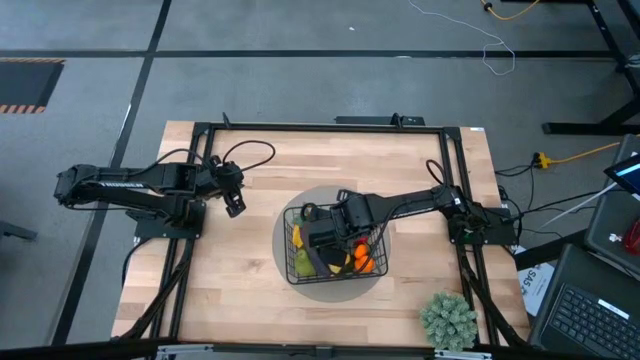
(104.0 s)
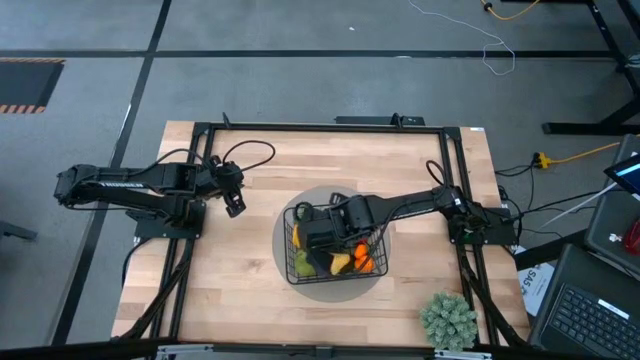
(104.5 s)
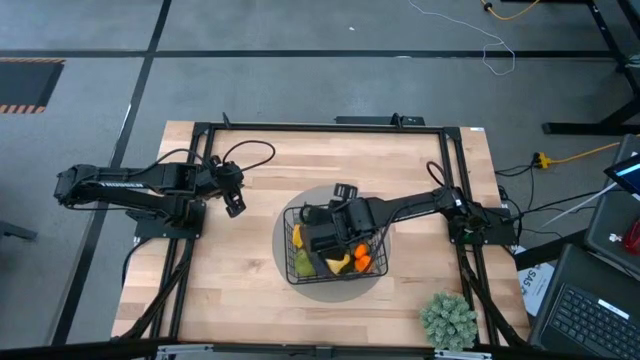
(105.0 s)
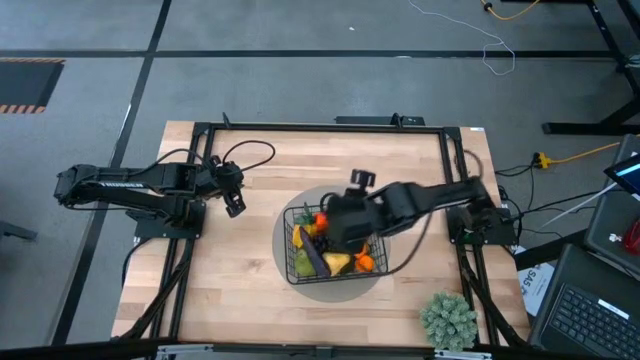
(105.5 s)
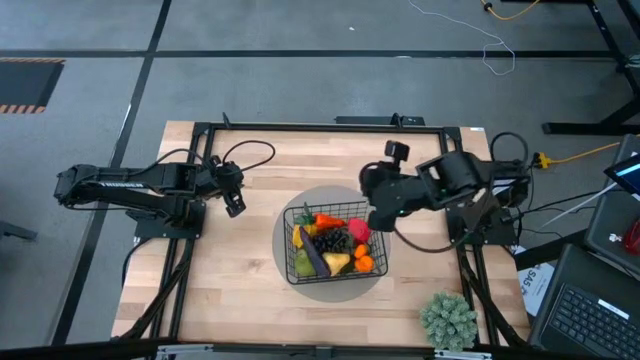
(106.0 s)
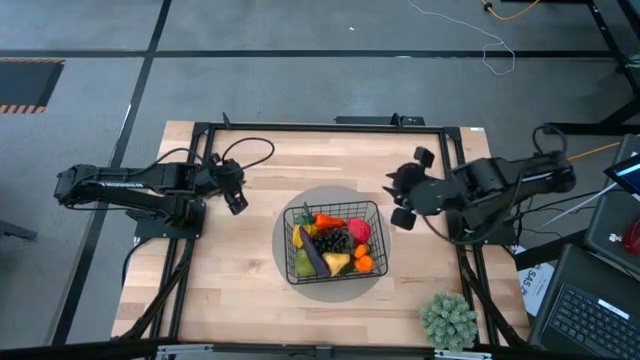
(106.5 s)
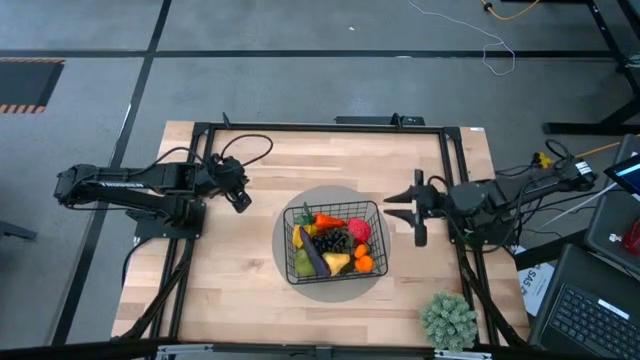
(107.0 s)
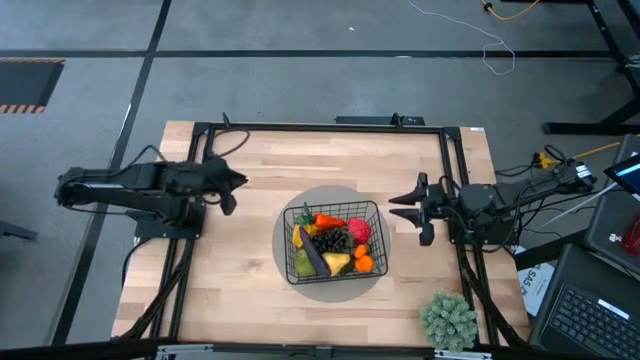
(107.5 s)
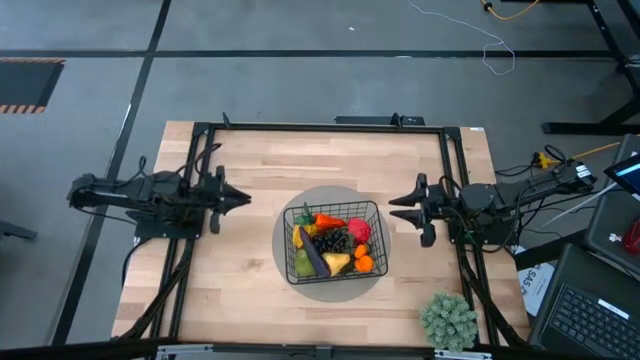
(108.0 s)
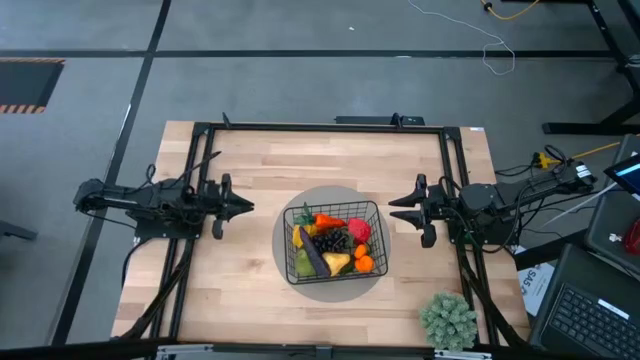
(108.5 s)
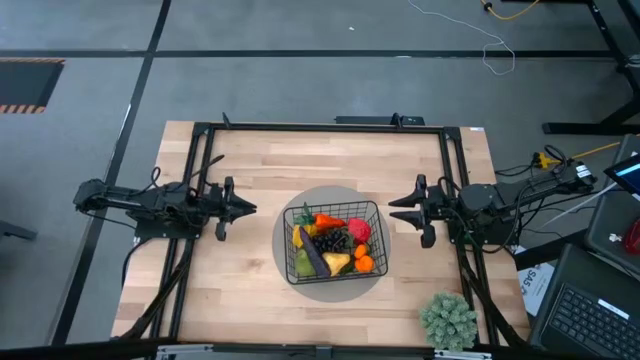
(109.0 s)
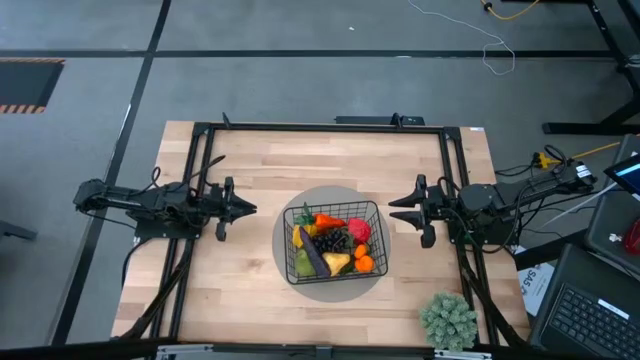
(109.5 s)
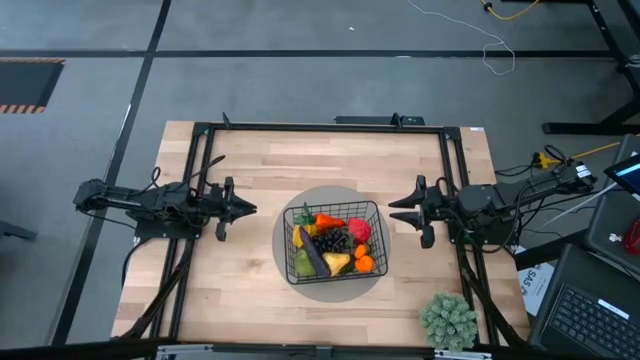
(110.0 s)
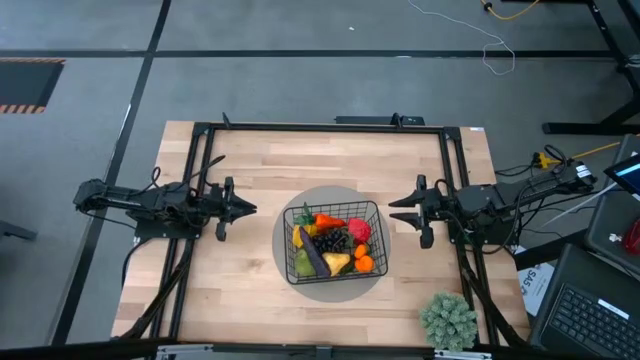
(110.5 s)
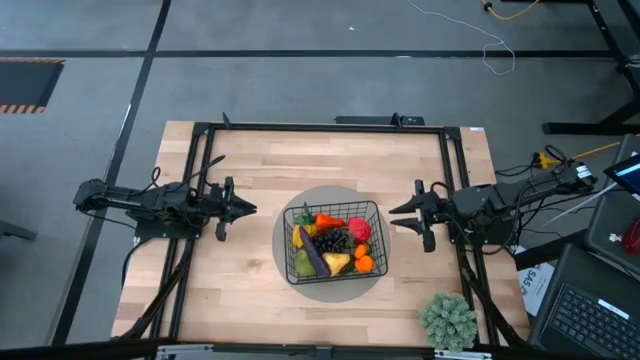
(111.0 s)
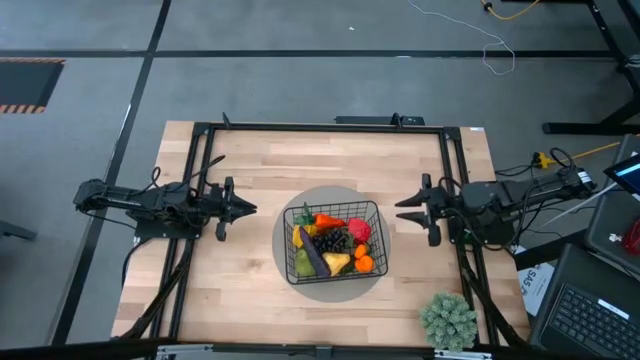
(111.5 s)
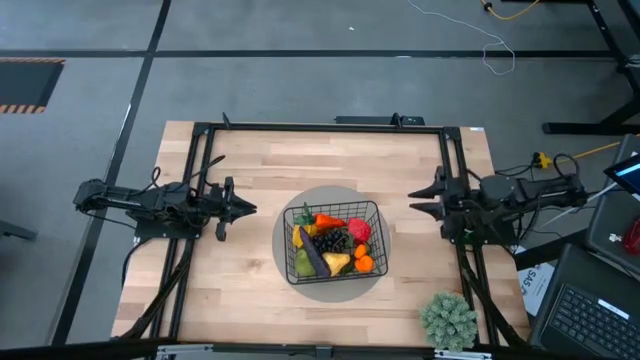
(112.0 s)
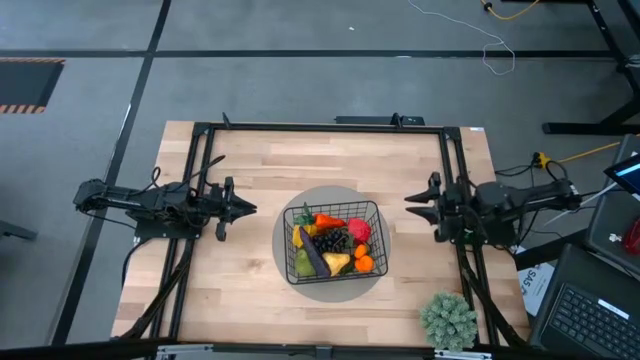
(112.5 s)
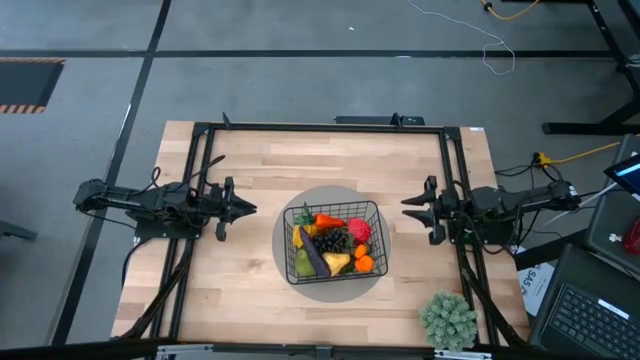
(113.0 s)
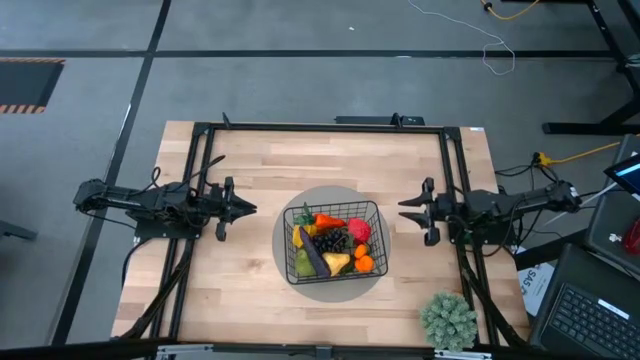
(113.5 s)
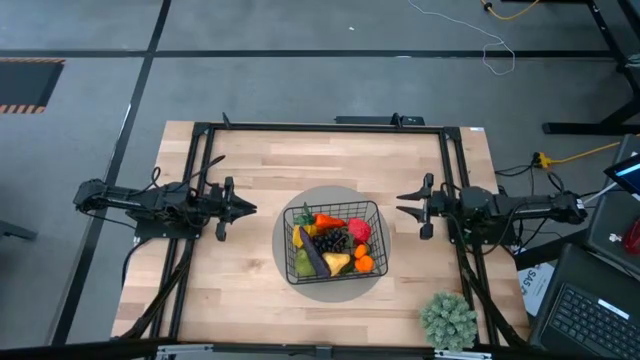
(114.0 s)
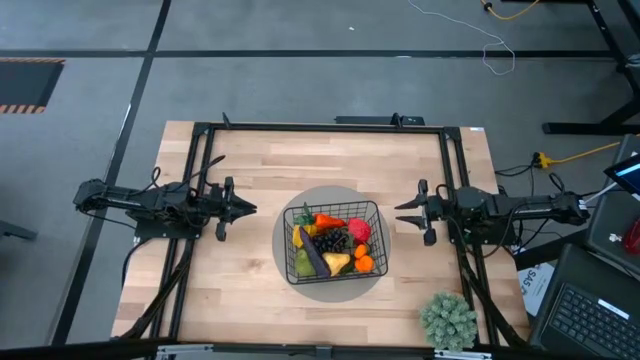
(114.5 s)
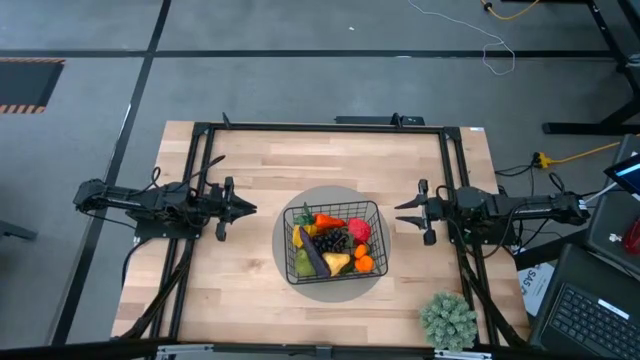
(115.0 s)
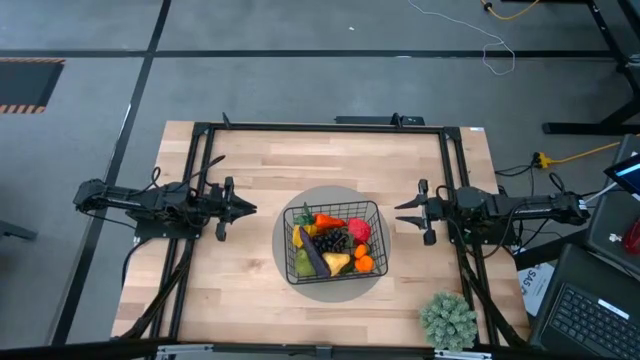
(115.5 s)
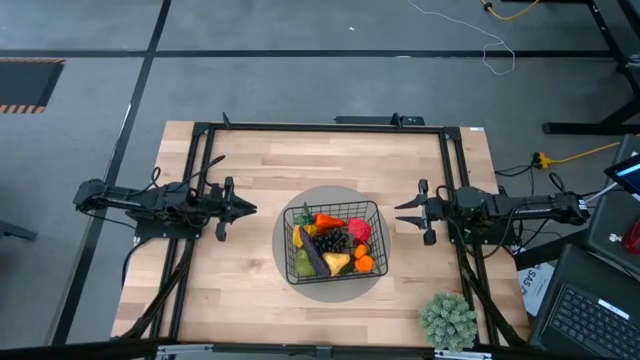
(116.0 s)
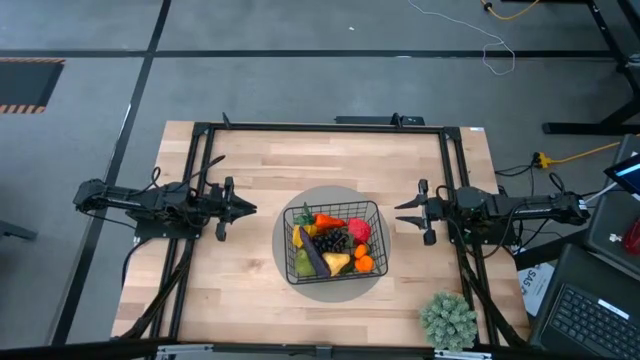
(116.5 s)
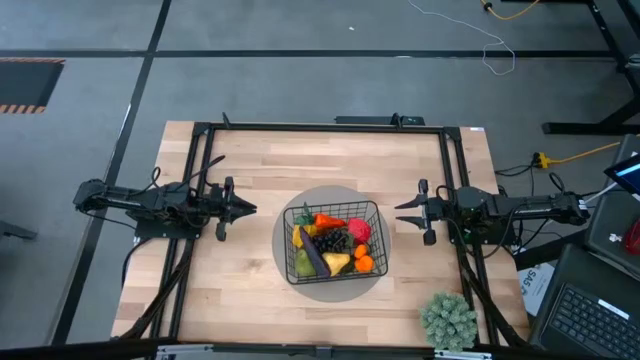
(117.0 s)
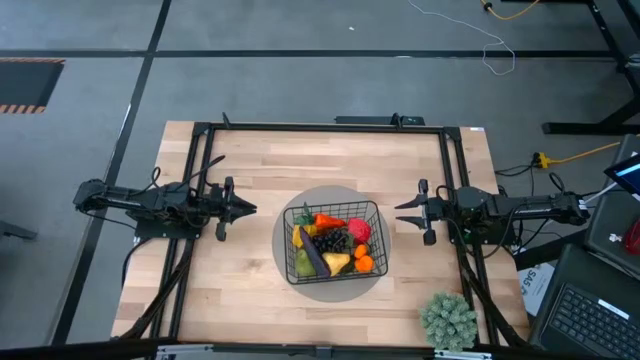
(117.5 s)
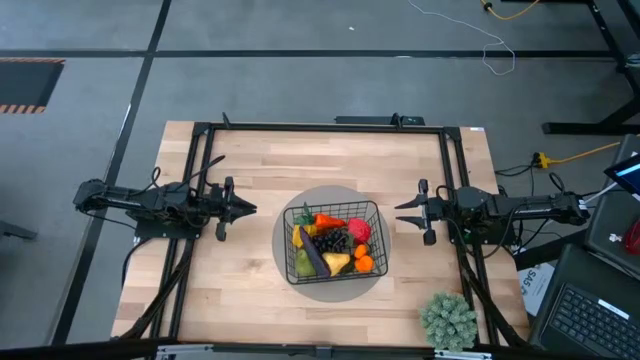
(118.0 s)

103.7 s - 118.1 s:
Task: Build produce basket
Return to Home Position

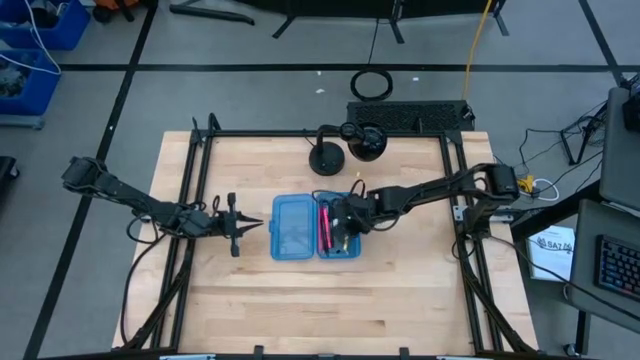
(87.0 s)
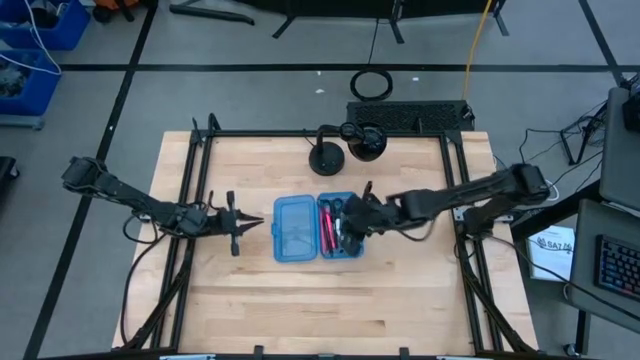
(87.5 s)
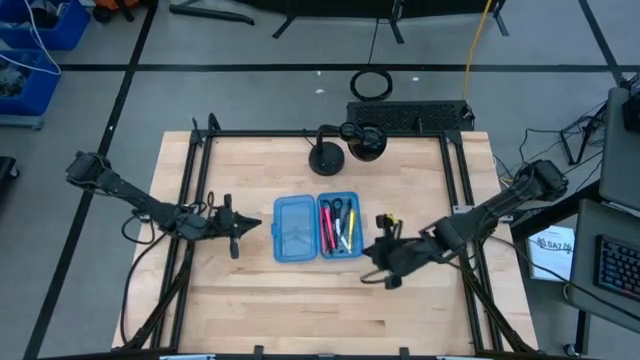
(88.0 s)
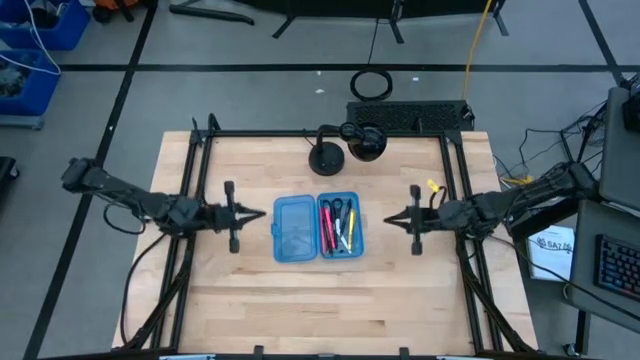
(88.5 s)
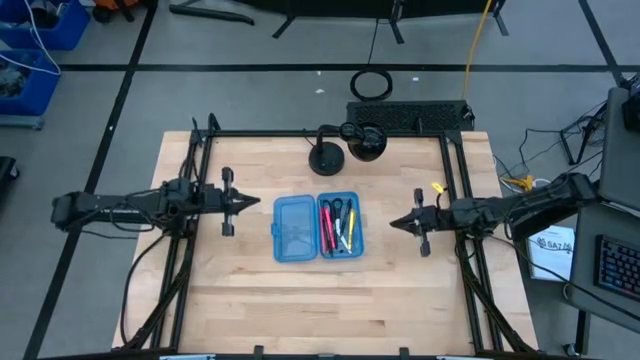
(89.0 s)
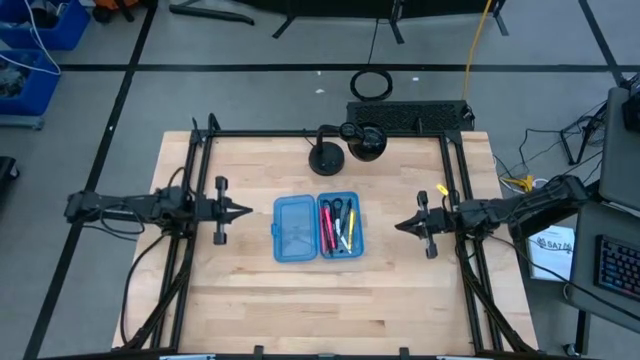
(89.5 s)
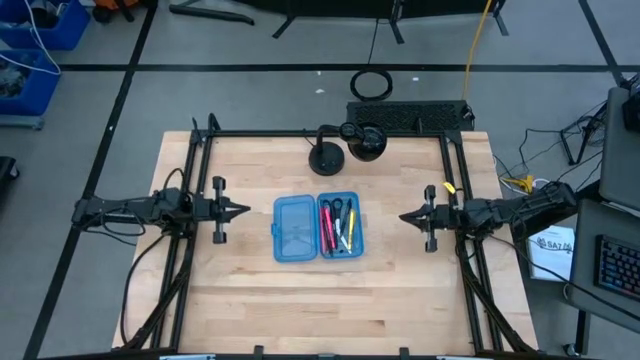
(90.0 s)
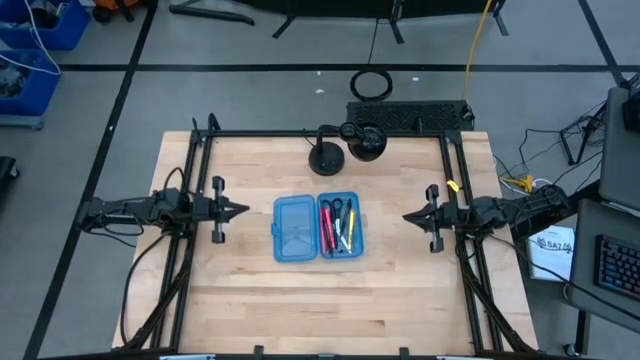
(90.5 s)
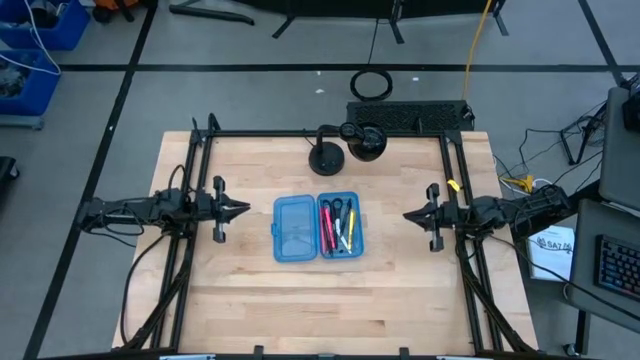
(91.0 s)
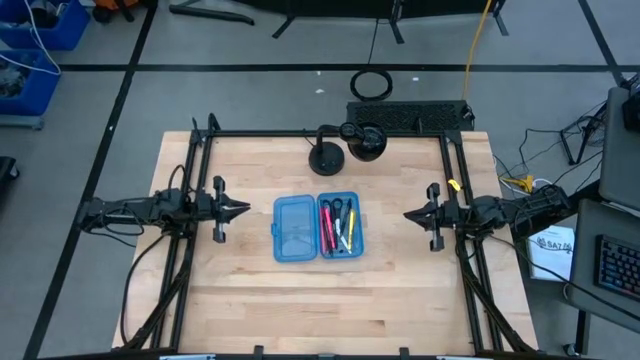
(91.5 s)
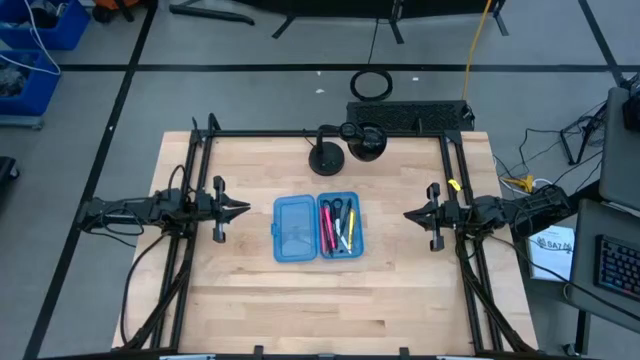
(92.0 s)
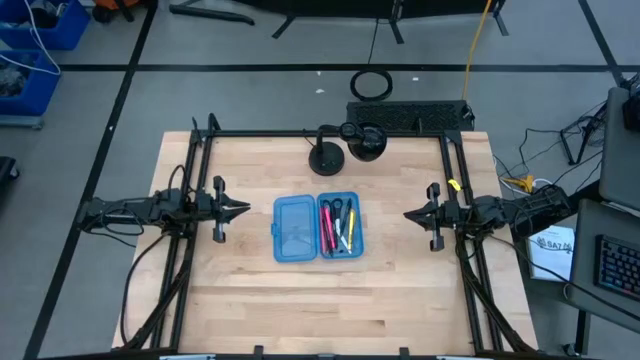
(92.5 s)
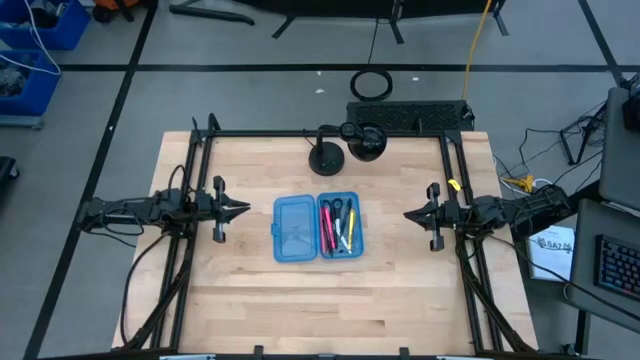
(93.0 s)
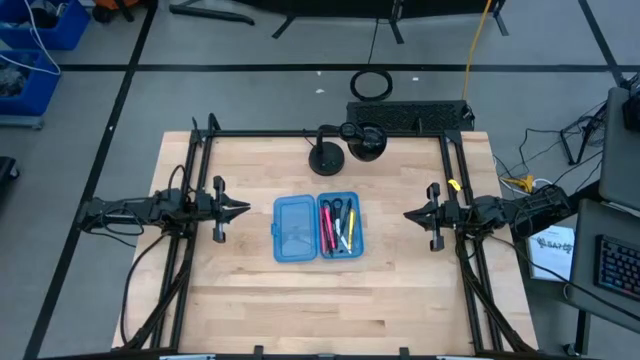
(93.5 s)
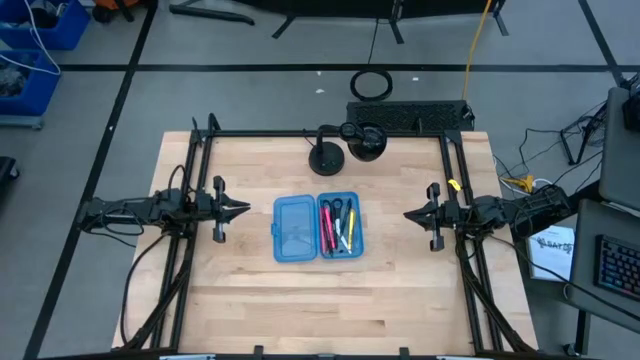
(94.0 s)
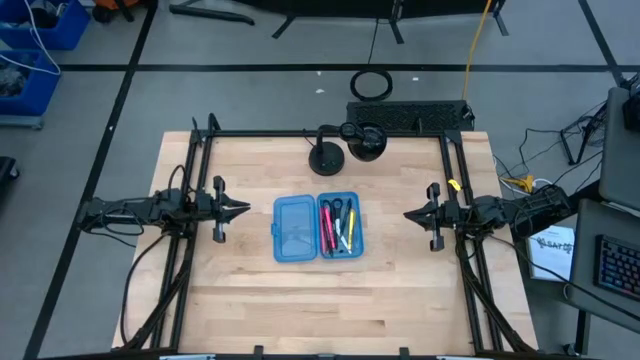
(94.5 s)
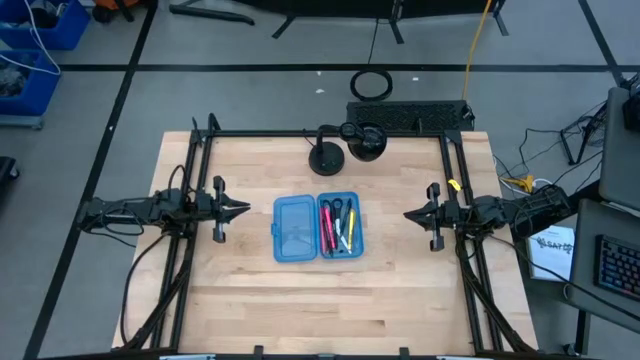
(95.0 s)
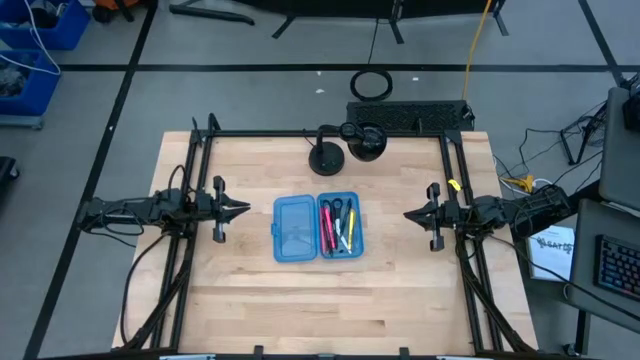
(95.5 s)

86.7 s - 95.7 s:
Task: Pick & place school supplies into a supply box
Return to Home Position
